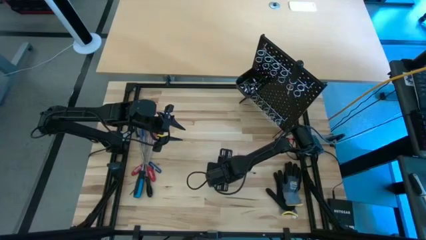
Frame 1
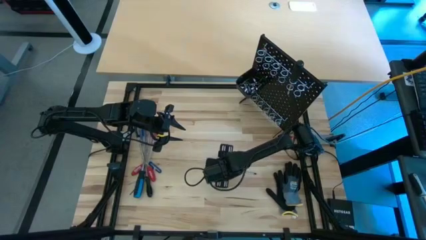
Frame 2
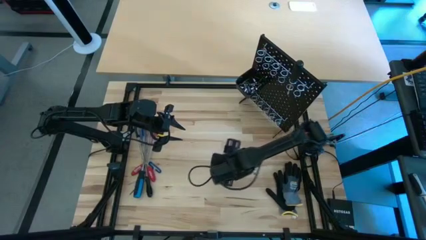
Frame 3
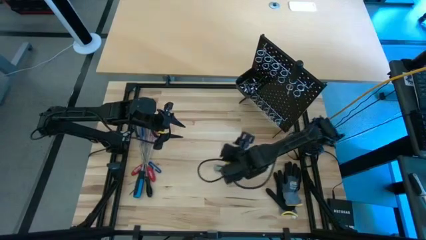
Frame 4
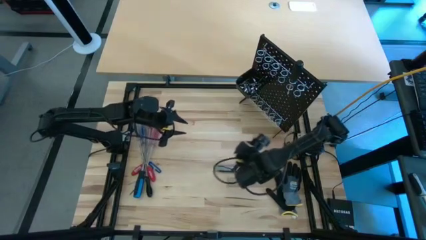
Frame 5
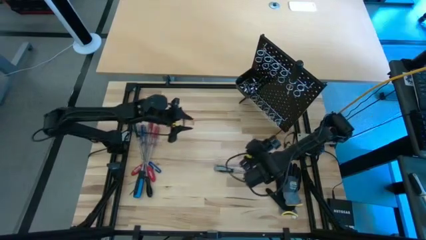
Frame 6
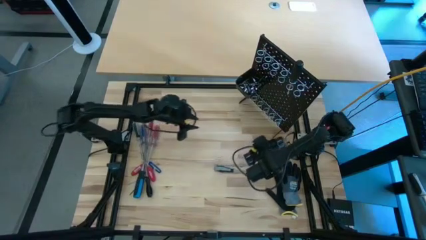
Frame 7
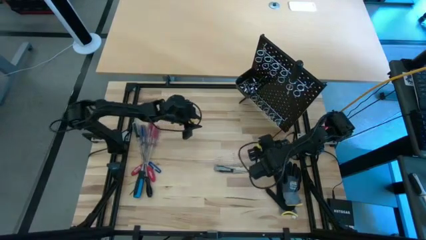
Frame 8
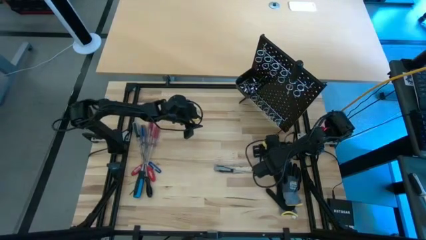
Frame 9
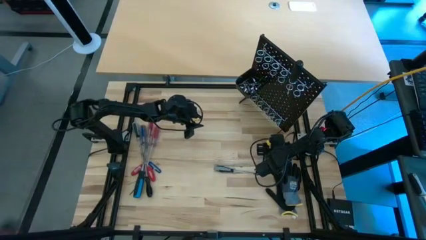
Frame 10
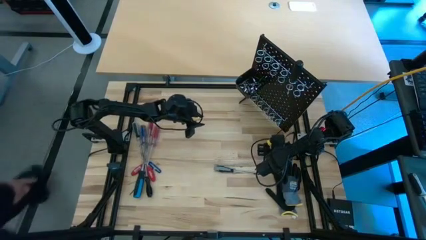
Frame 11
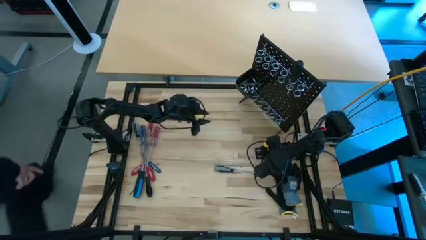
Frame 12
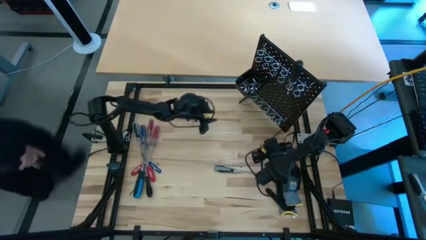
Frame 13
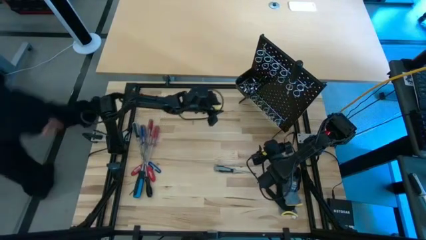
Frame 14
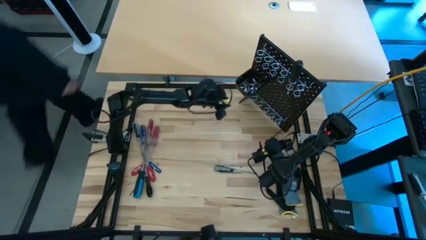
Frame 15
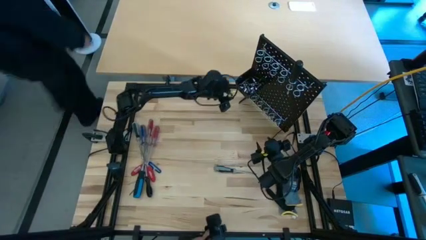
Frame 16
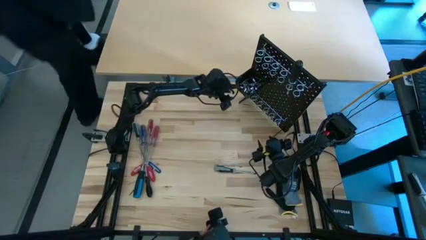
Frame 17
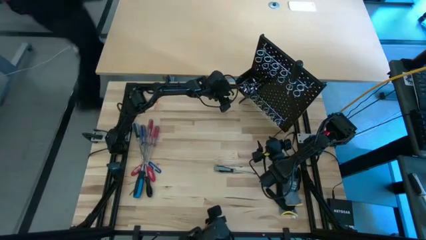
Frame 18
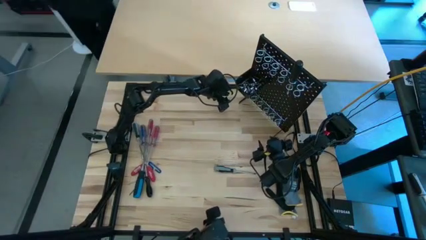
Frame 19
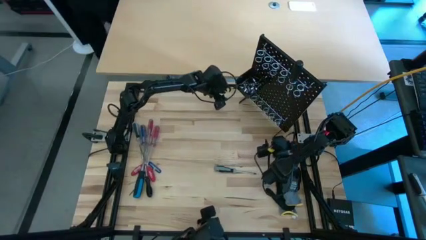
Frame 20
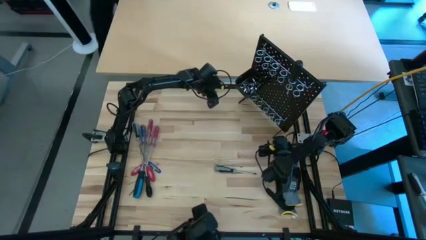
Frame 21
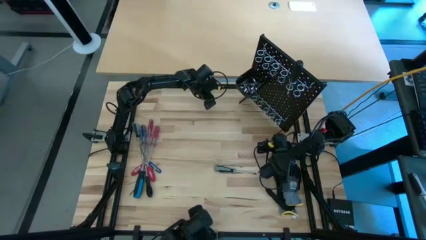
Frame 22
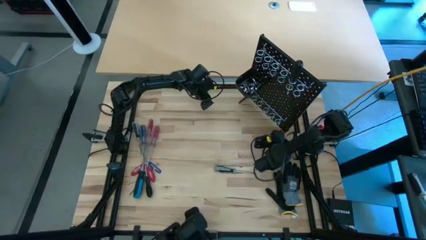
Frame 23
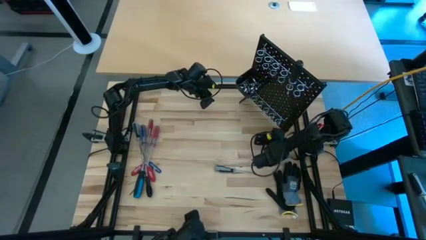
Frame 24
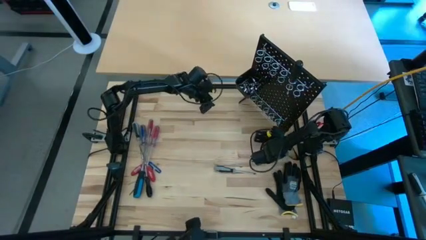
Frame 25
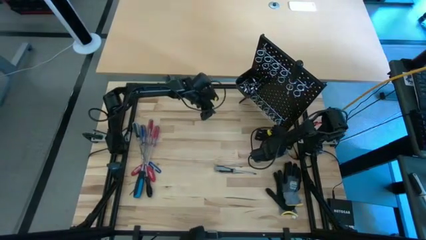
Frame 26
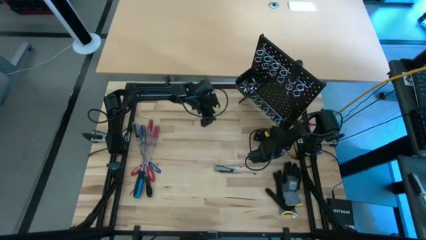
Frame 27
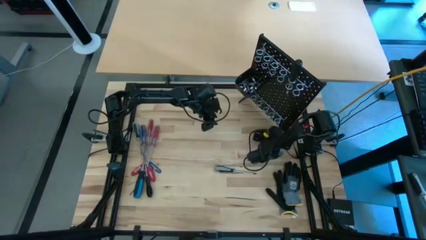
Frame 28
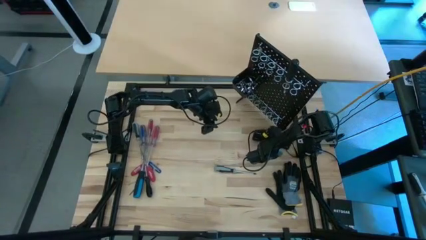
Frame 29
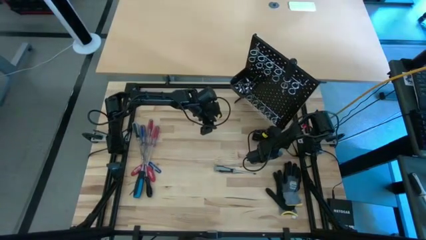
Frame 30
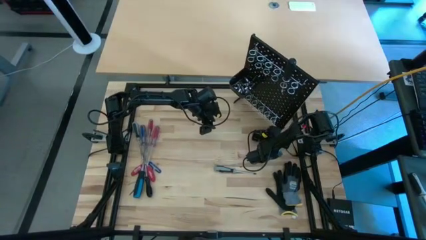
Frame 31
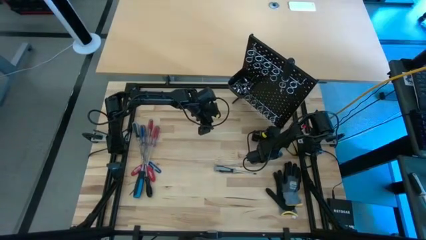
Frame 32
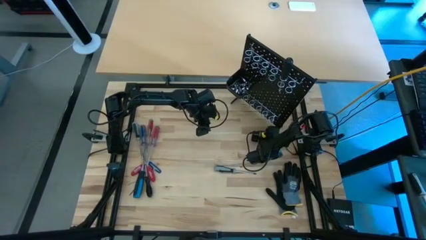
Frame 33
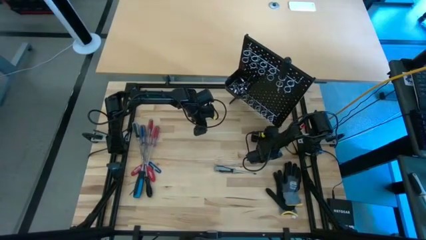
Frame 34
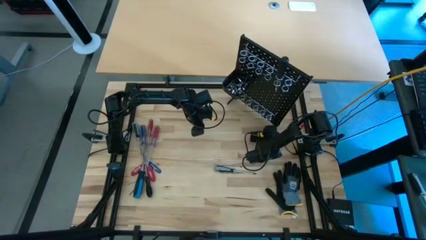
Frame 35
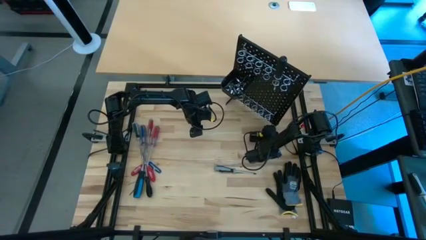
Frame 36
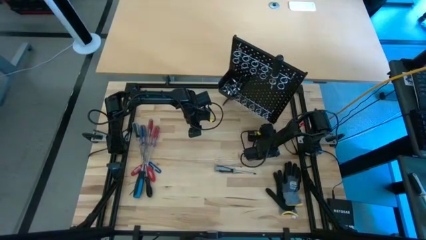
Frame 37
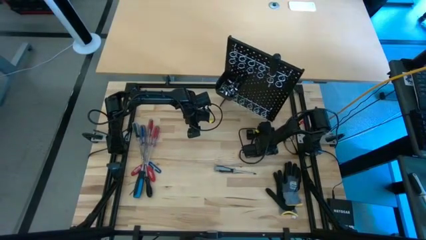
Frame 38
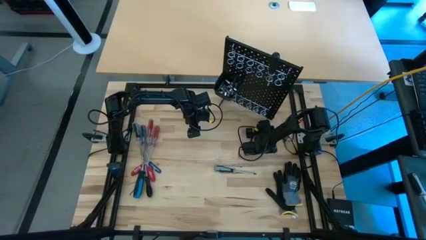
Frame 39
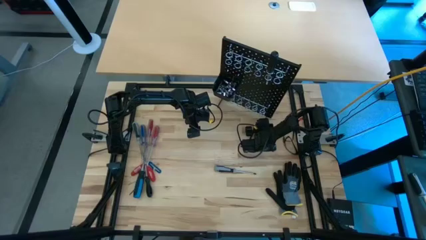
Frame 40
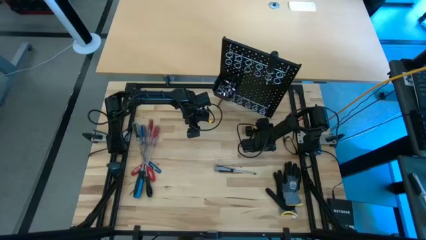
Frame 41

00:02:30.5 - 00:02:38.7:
Task: Hang tools onto peg board
Adjust the black pegboard

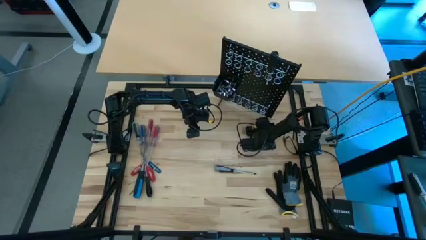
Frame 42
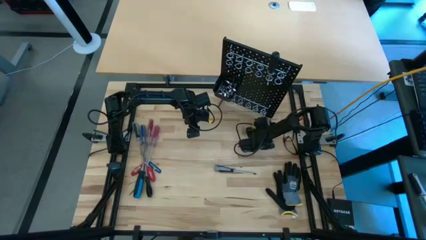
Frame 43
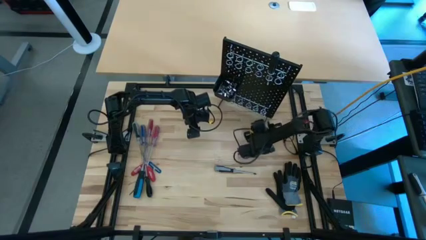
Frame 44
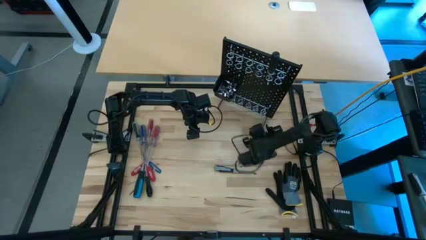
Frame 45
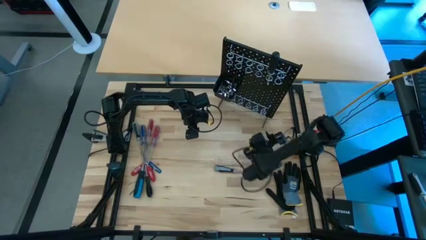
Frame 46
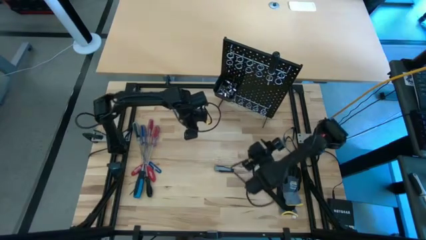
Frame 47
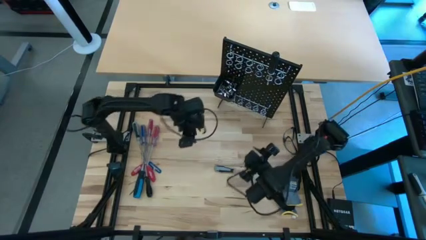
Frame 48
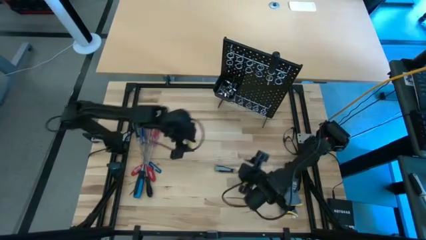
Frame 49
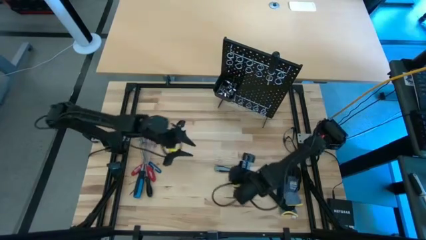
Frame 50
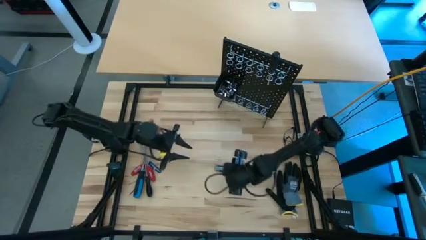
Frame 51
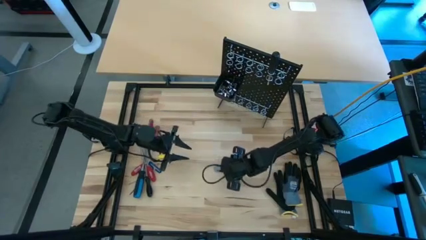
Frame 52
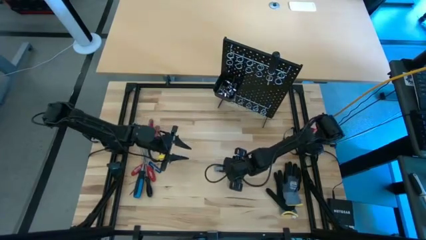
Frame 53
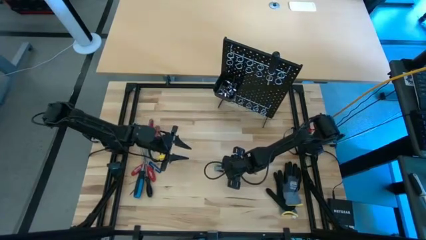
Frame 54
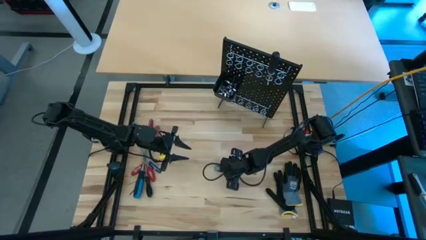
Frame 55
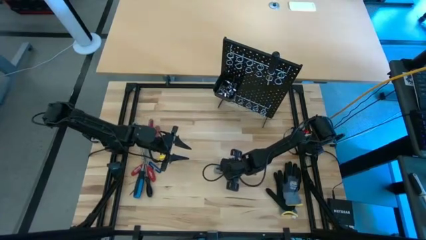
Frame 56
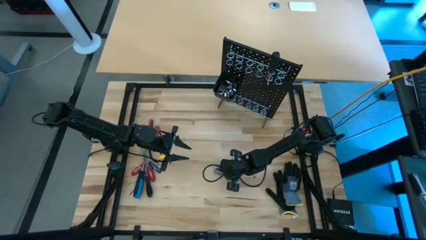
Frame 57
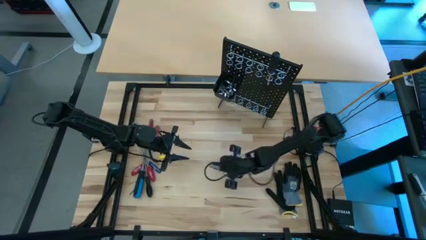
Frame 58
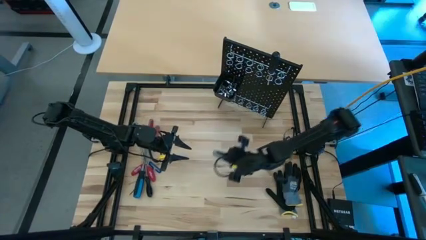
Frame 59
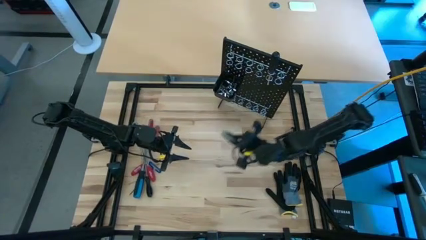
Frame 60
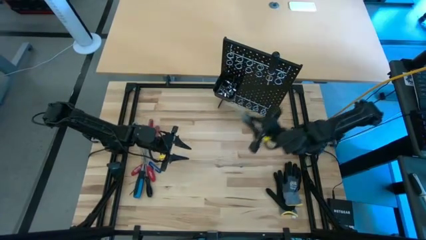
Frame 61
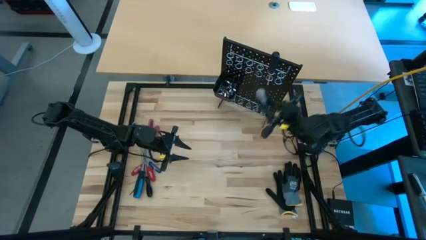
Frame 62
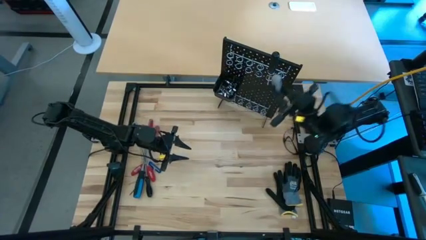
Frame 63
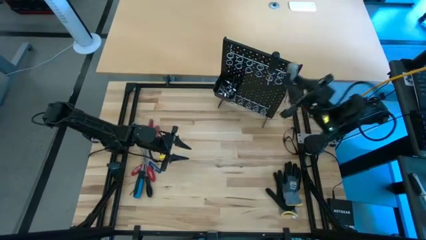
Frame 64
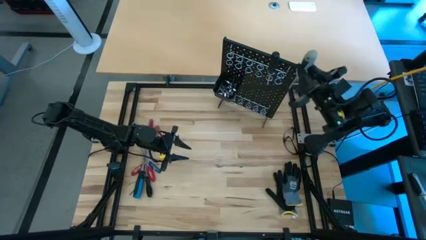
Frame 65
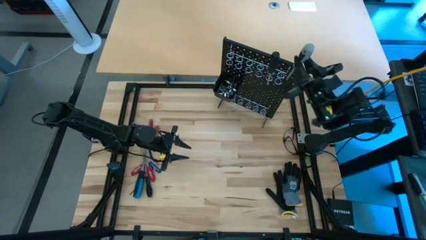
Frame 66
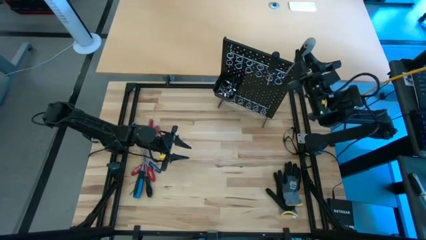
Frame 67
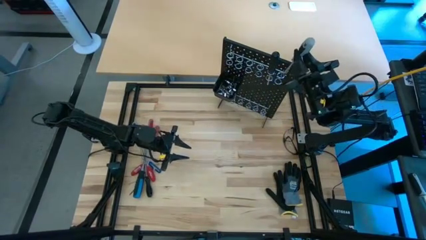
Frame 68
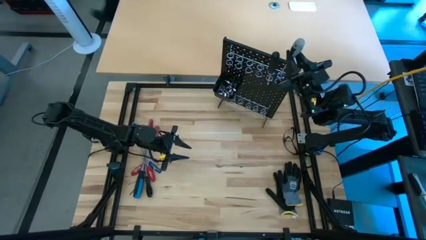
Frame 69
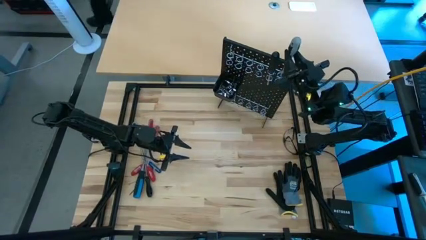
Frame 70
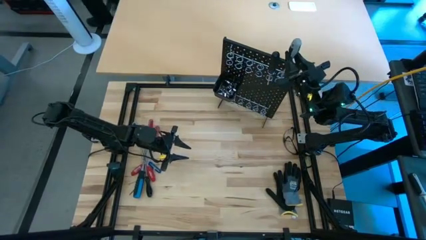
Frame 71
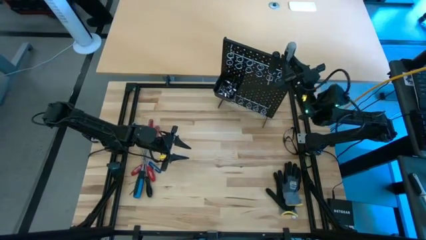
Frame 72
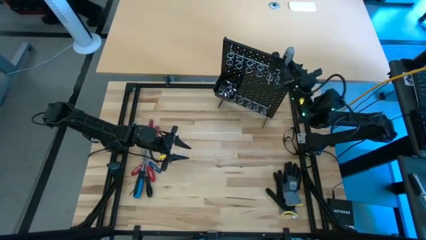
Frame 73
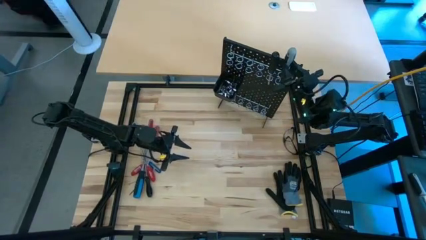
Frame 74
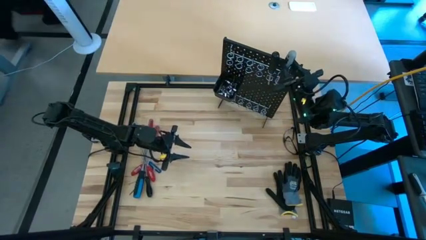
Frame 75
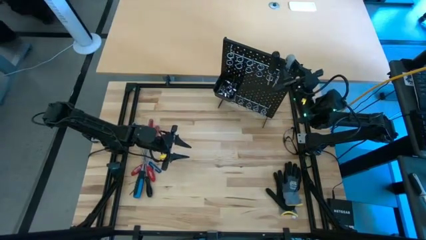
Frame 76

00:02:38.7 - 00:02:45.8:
Hang the right gray screwdriver on the black pegboard
